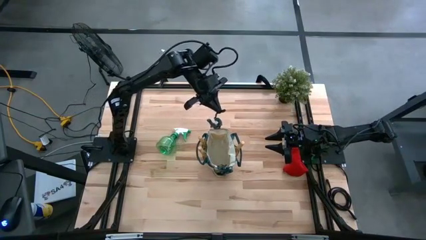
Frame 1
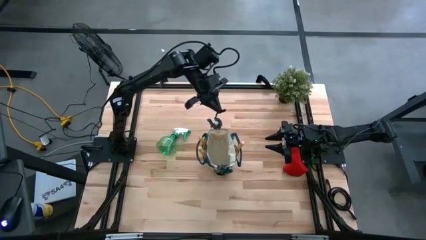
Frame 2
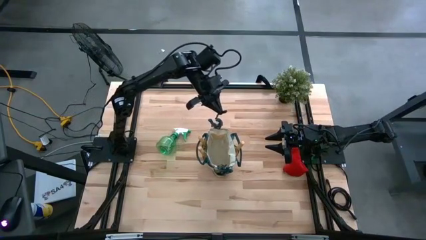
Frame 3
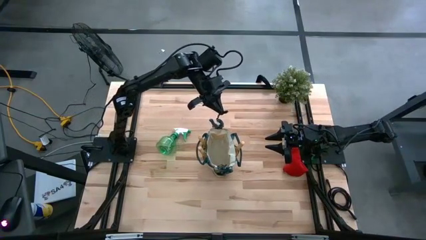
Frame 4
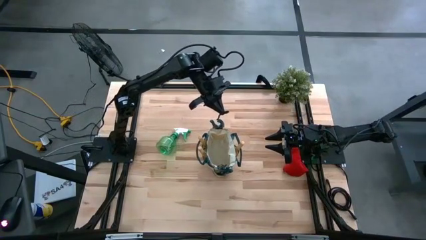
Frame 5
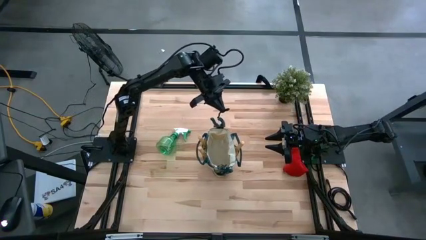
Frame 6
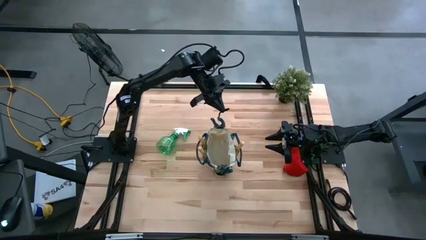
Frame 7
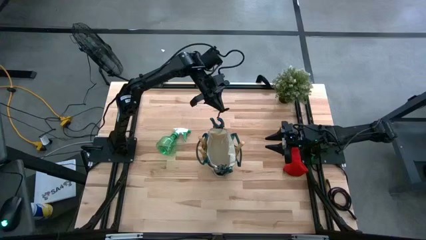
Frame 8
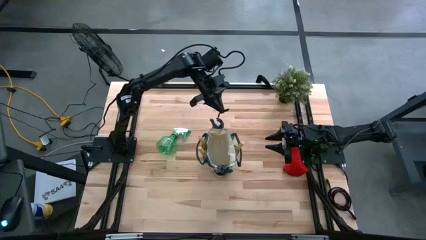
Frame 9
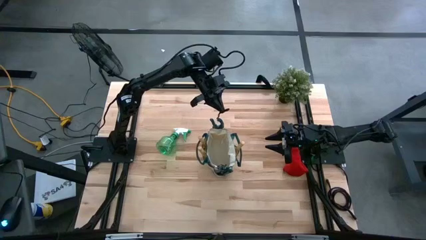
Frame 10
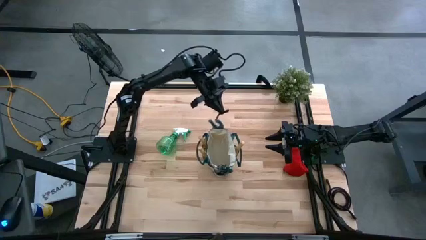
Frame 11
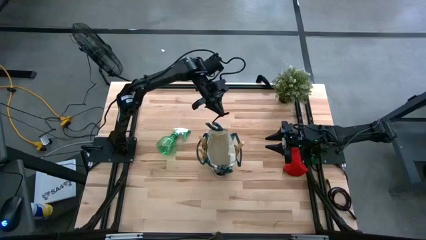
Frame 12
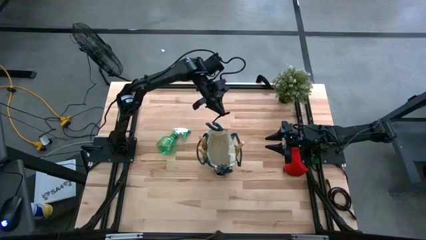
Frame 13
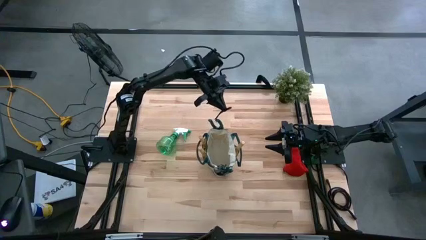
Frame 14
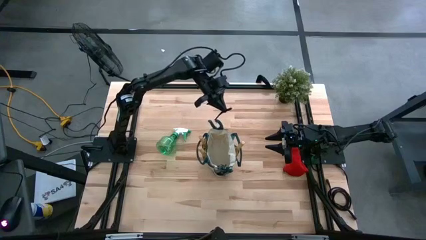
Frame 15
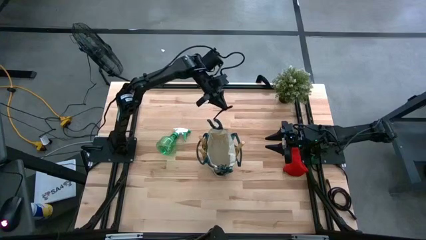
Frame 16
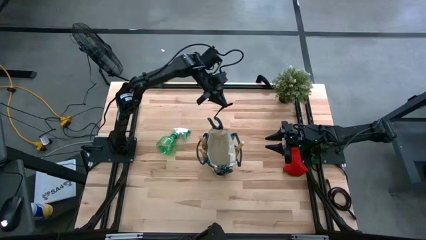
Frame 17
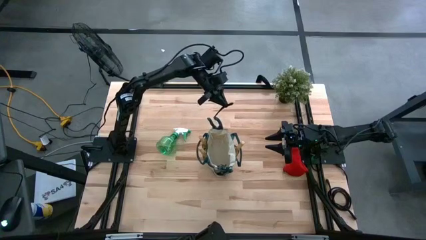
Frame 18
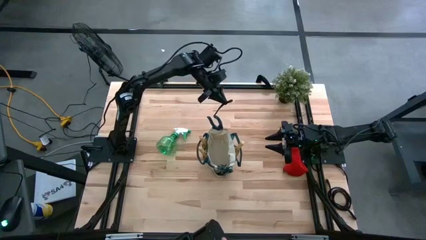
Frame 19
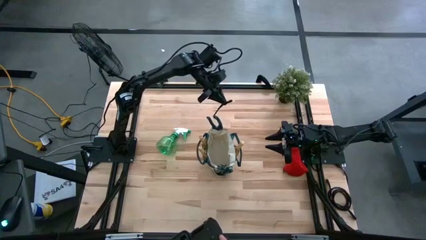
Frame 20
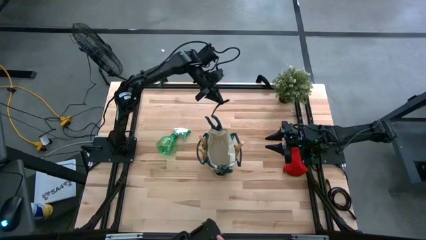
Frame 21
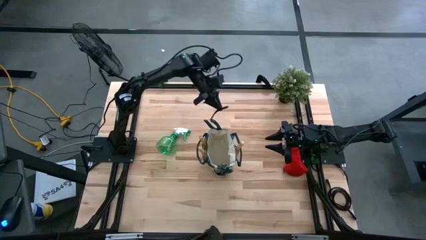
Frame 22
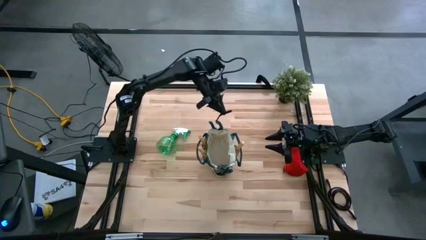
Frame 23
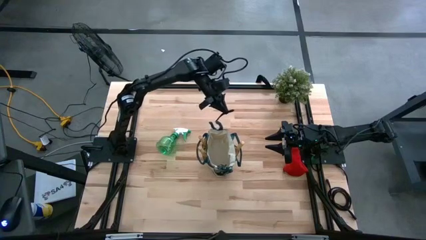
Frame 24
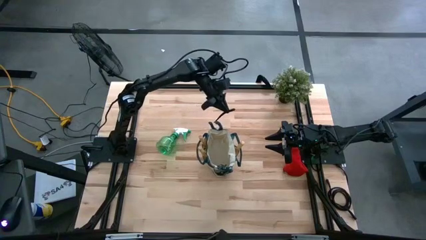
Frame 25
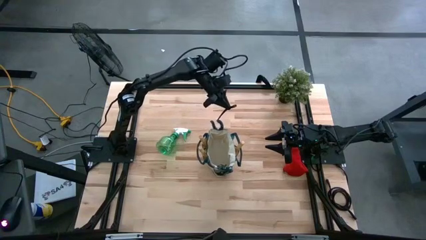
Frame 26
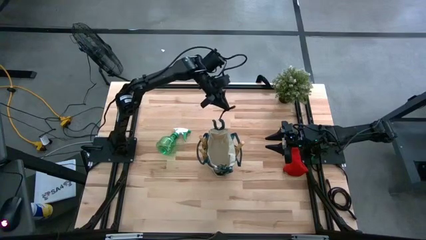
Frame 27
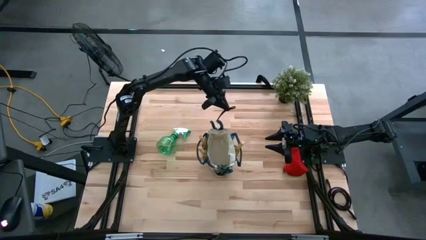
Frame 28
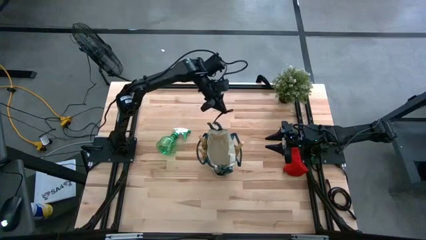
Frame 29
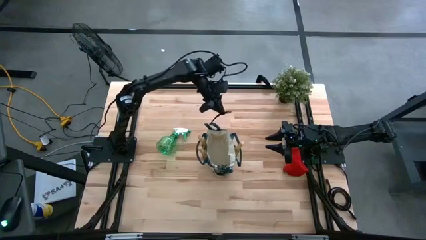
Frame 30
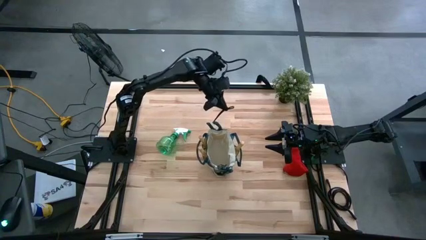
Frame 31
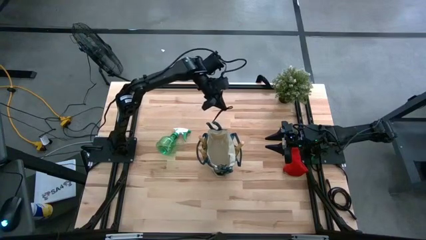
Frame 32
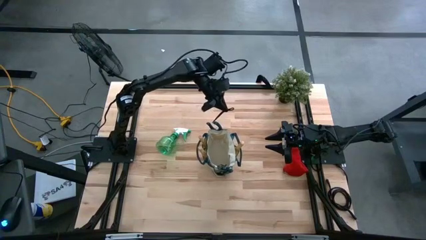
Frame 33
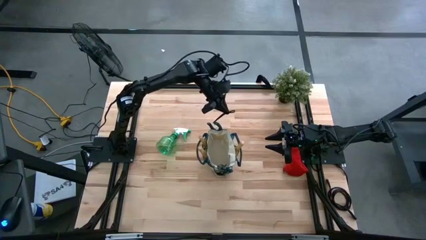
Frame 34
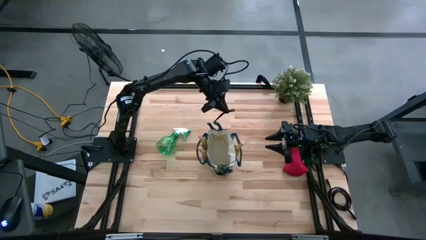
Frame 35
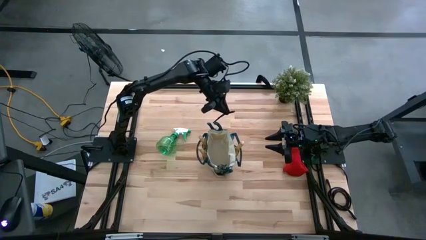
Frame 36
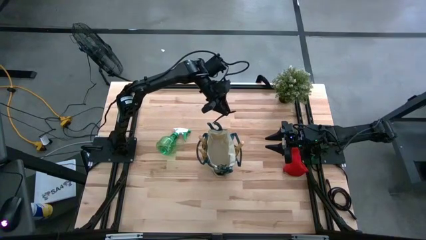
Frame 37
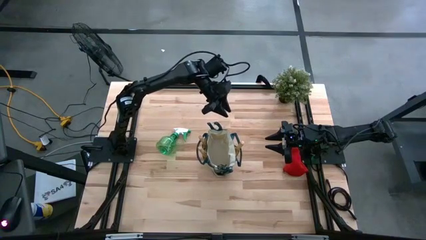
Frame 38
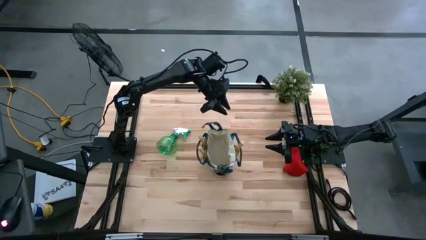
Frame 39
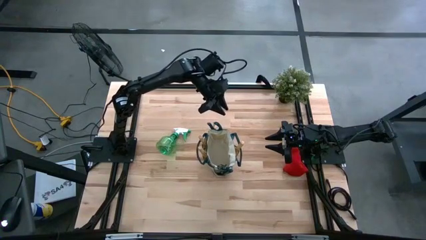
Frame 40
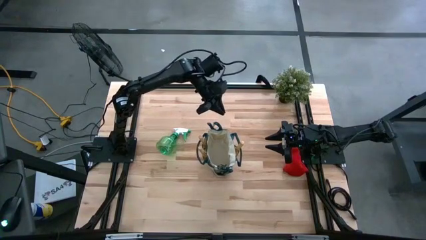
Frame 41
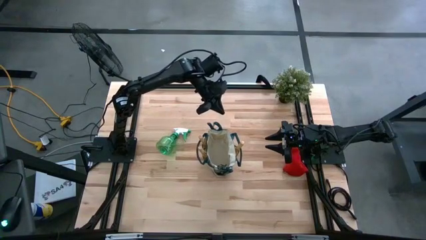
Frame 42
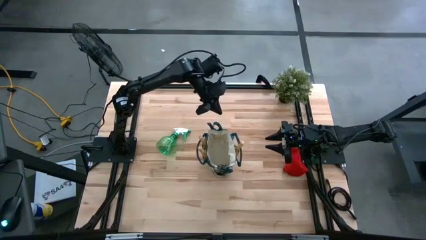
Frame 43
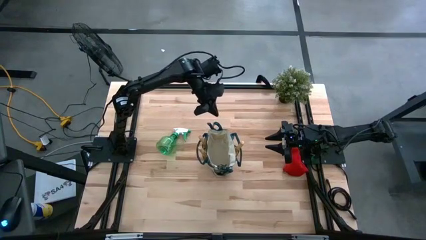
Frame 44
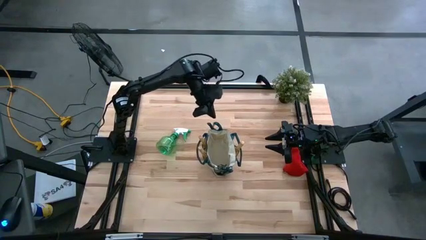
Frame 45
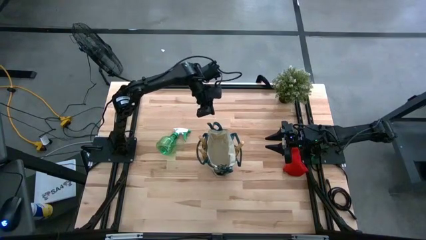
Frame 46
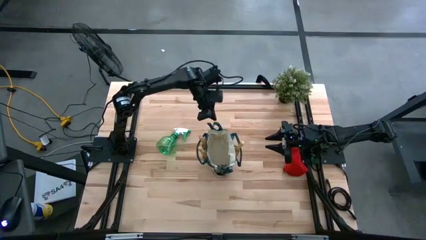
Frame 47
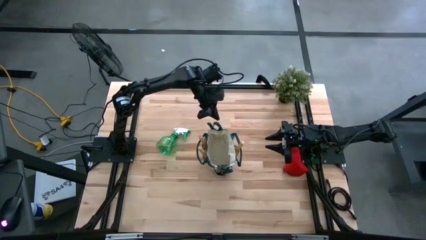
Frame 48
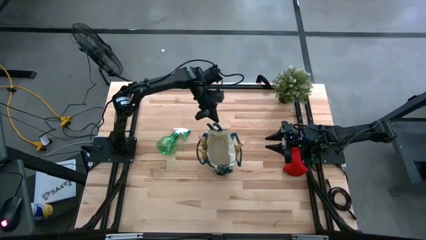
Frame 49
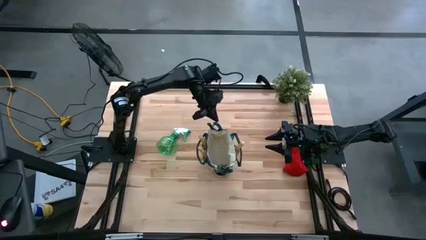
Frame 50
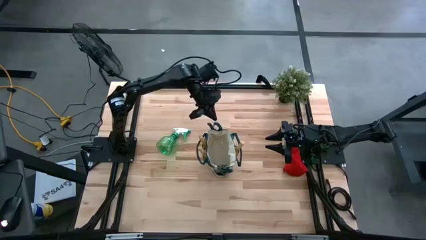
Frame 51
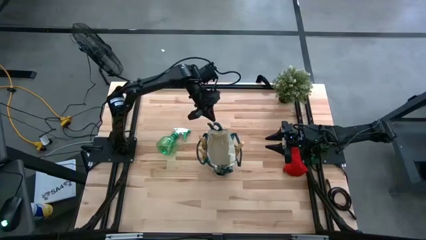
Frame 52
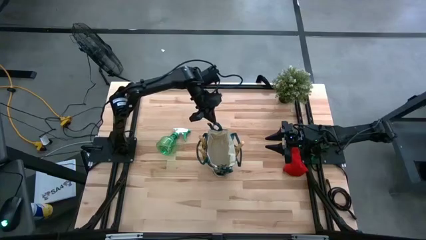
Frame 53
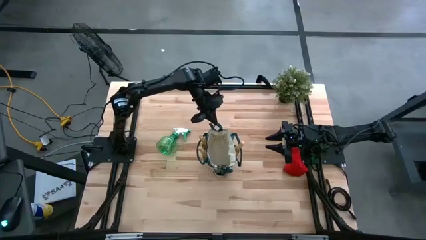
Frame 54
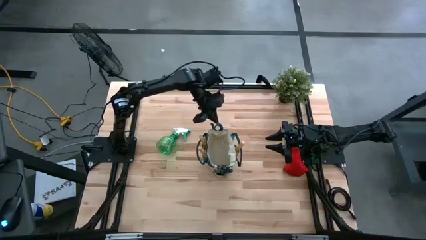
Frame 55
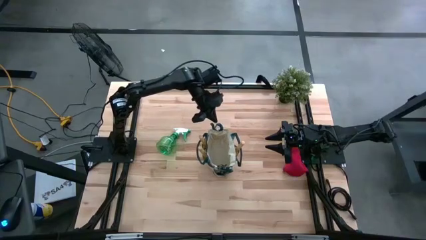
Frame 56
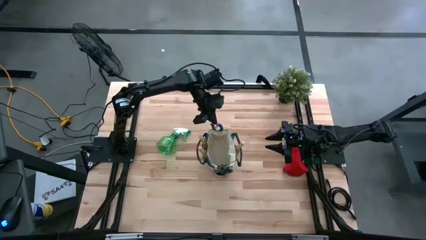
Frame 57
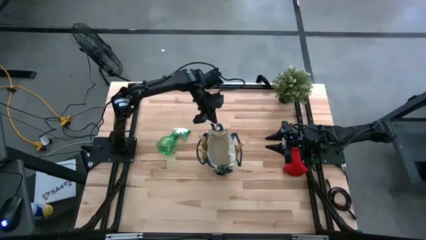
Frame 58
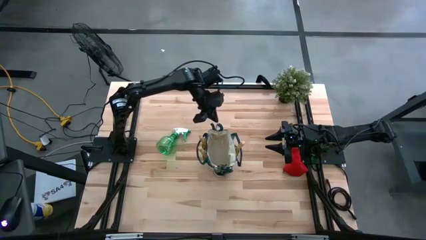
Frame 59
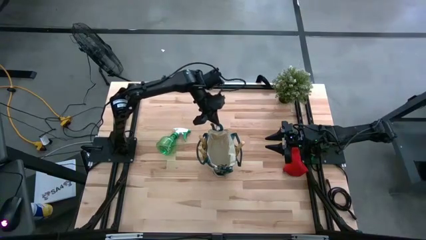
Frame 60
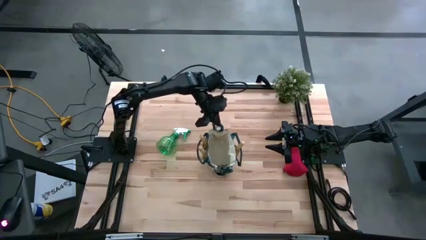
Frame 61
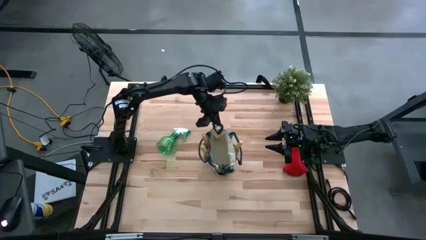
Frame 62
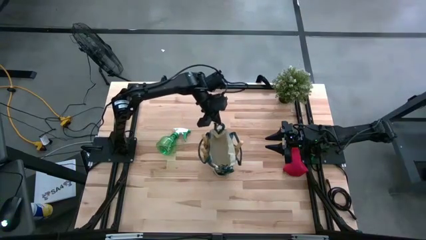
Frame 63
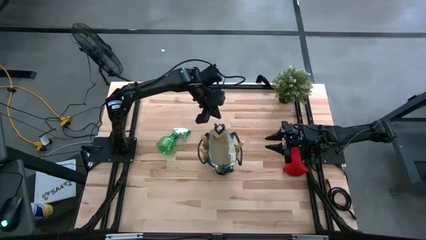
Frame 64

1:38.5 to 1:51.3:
Task: Pick & Place Garden tools in Gardening bag
Put the green shears into the white gardening bag

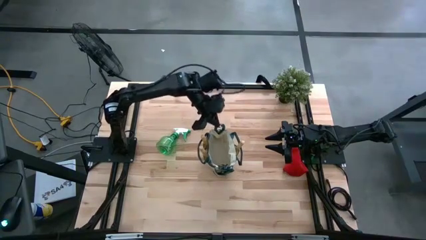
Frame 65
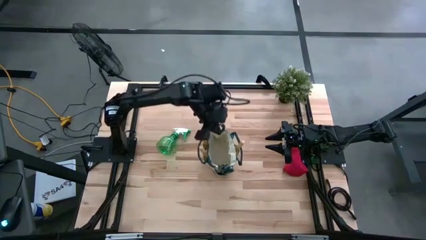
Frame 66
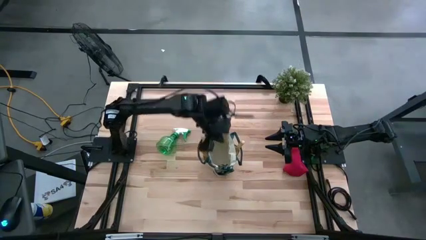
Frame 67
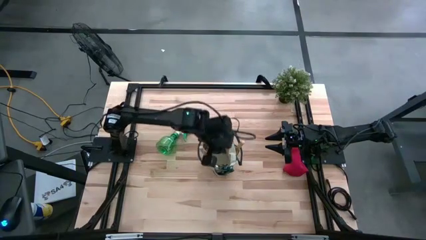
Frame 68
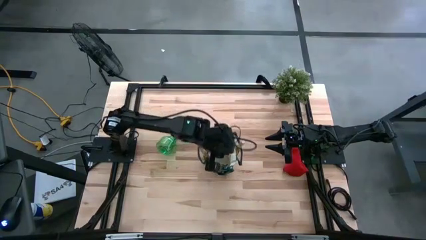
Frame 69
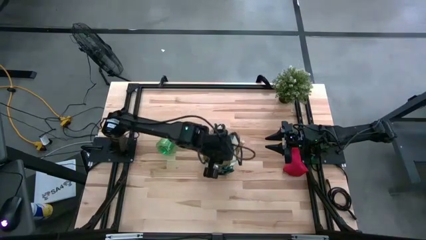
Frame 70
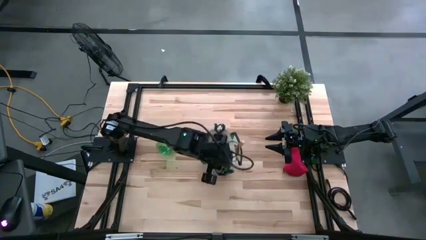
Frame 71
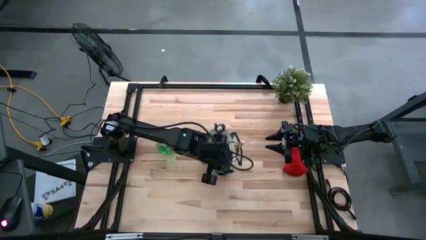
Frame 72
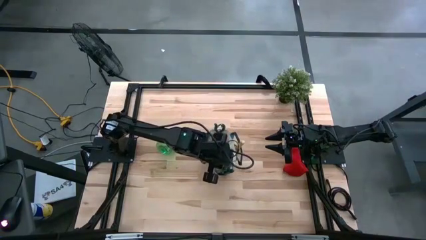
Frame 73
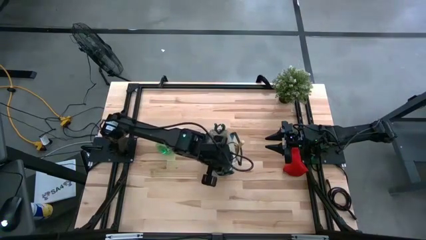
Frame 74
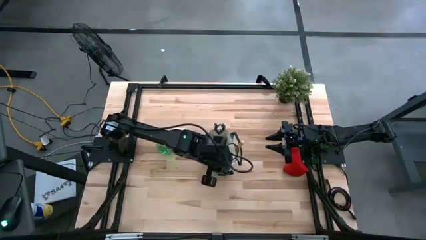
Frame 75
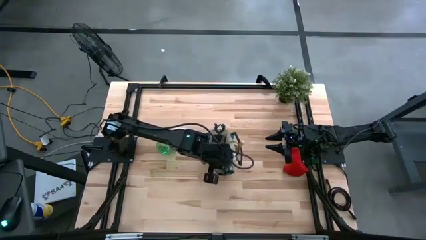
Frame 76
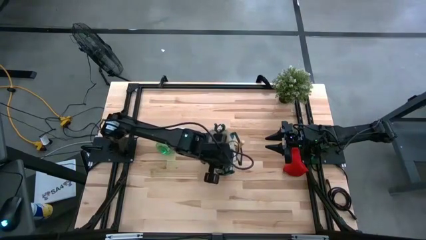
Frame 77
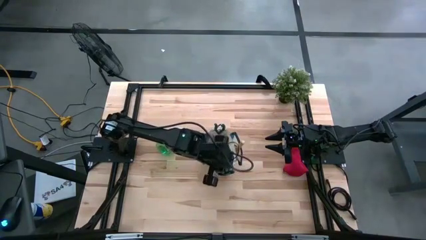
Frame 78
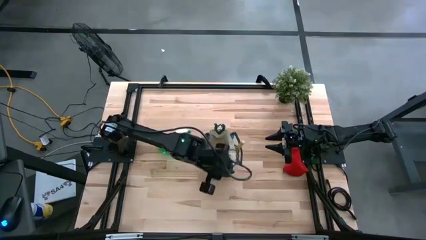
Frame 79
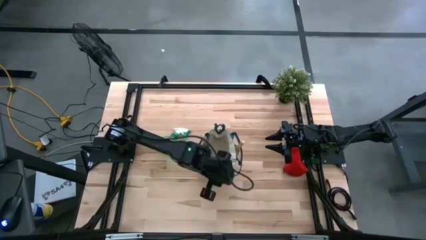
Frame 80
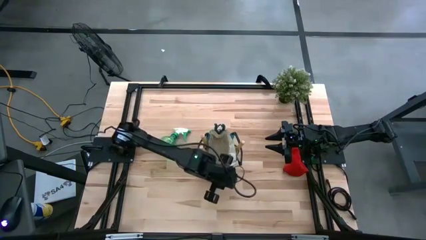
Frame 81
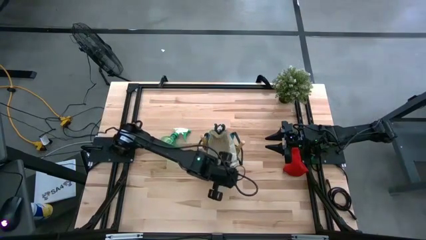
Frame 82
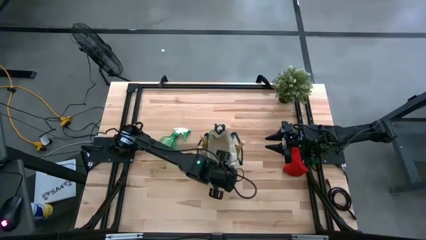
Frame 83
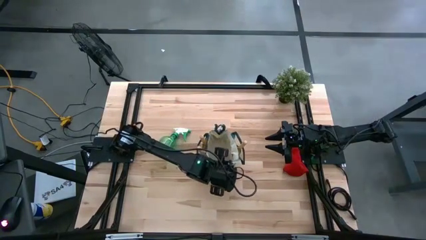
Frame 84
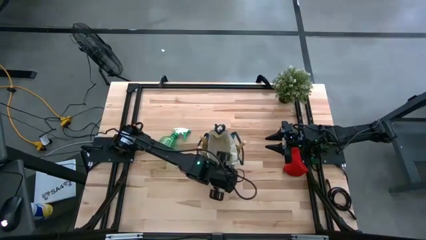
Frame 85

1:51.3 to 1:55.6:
Adjust the green shears in the white gardening bag
